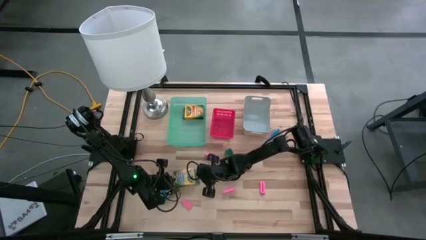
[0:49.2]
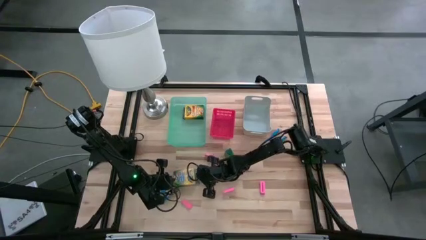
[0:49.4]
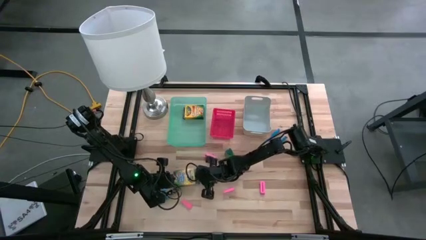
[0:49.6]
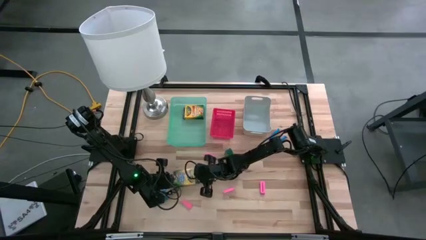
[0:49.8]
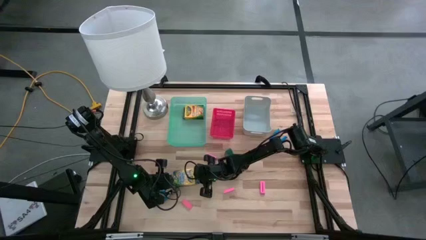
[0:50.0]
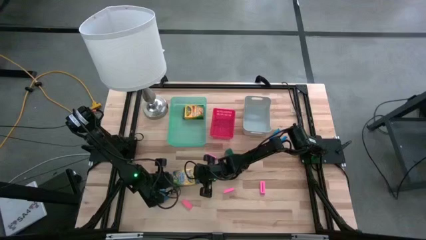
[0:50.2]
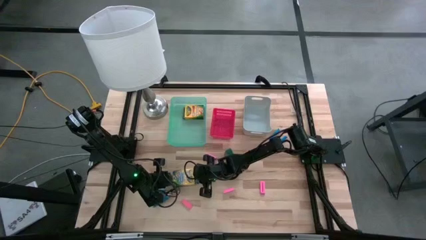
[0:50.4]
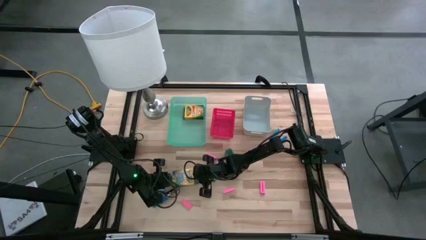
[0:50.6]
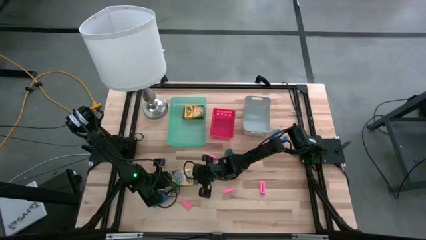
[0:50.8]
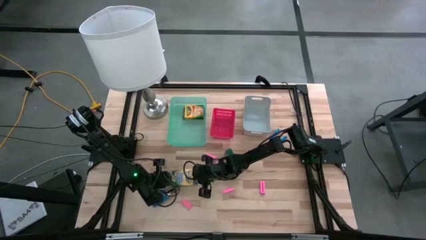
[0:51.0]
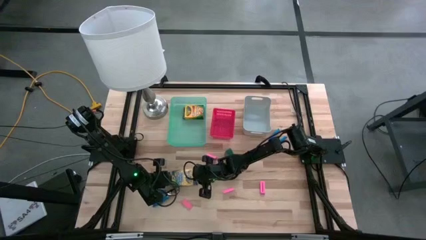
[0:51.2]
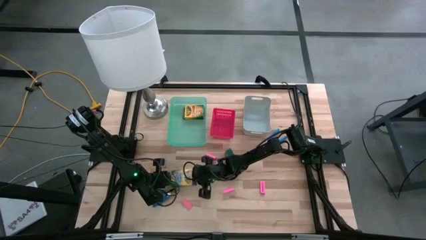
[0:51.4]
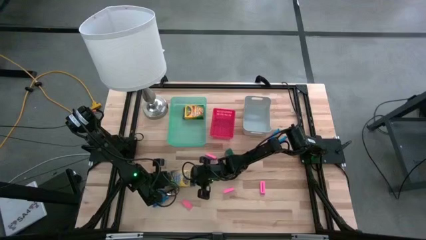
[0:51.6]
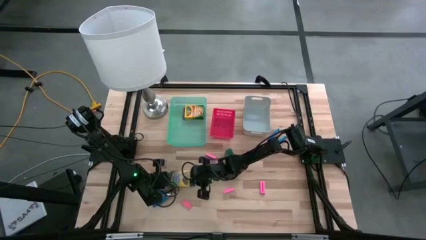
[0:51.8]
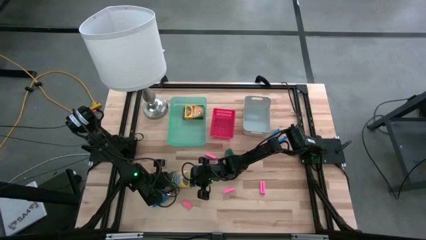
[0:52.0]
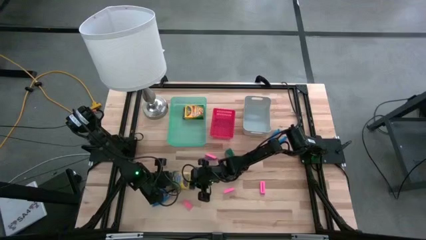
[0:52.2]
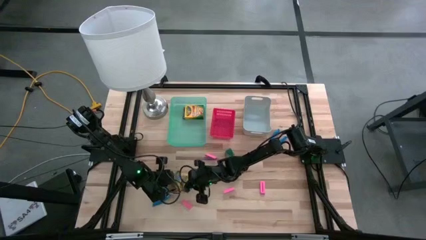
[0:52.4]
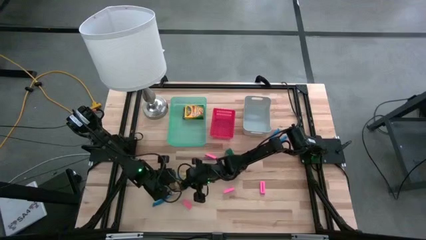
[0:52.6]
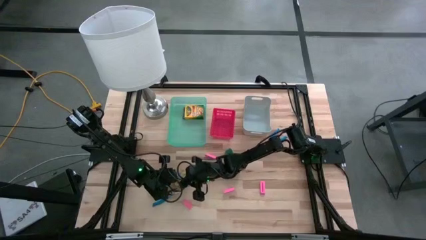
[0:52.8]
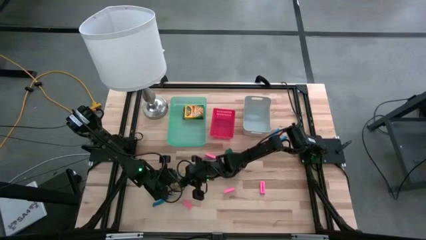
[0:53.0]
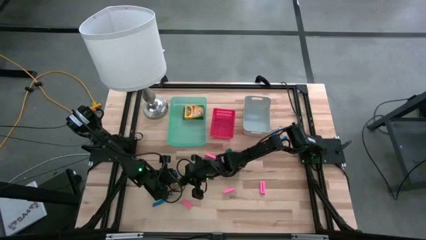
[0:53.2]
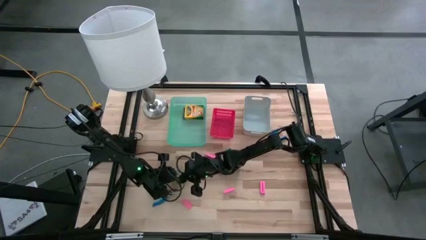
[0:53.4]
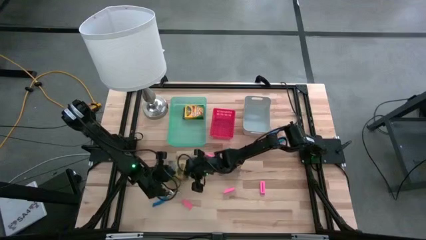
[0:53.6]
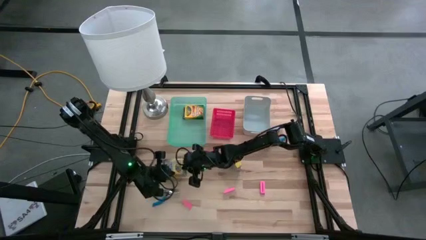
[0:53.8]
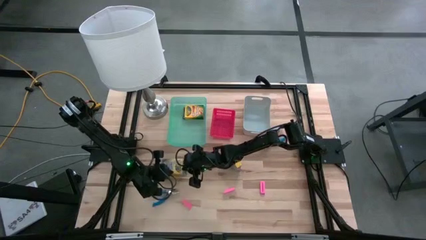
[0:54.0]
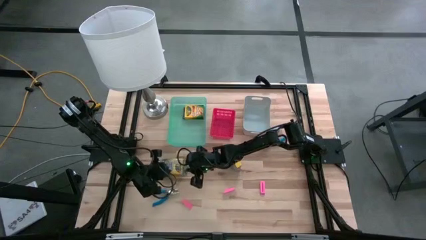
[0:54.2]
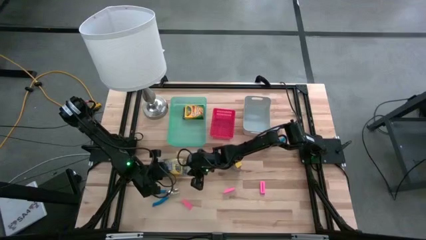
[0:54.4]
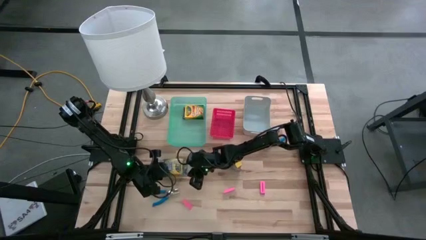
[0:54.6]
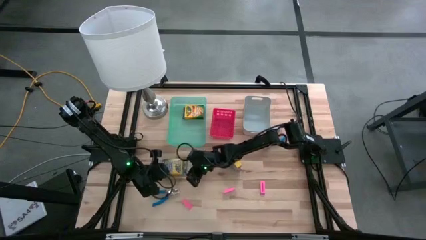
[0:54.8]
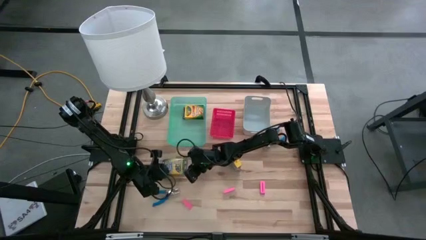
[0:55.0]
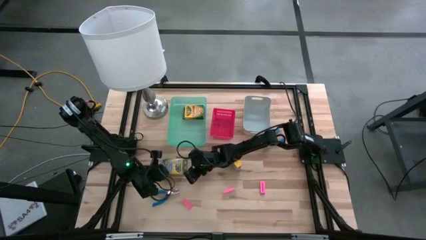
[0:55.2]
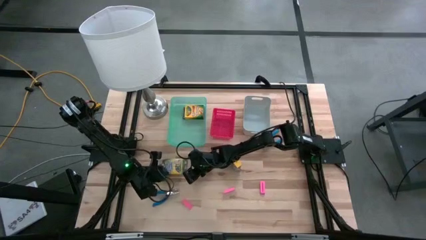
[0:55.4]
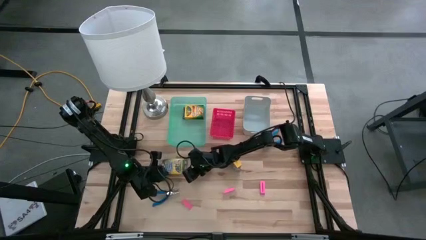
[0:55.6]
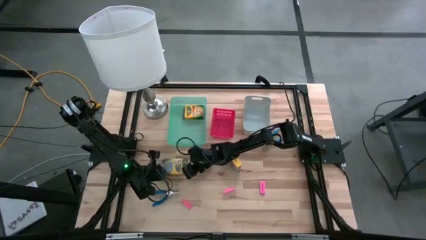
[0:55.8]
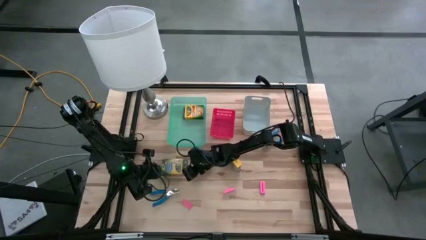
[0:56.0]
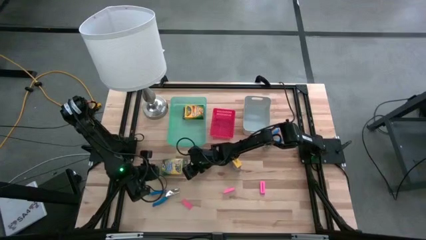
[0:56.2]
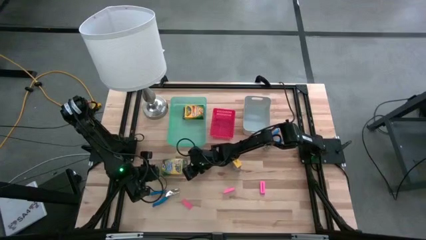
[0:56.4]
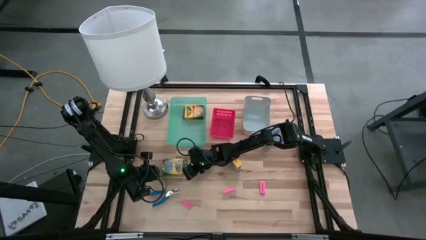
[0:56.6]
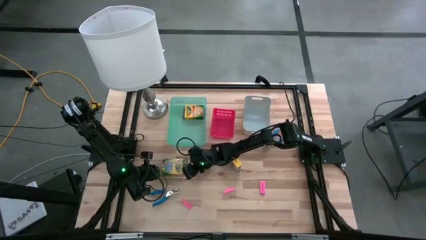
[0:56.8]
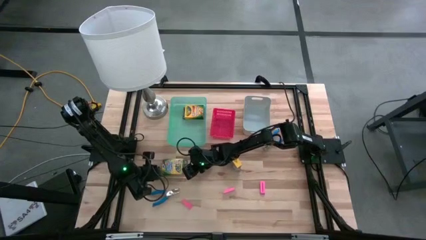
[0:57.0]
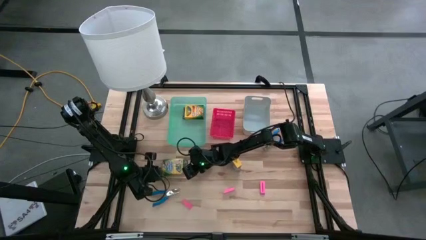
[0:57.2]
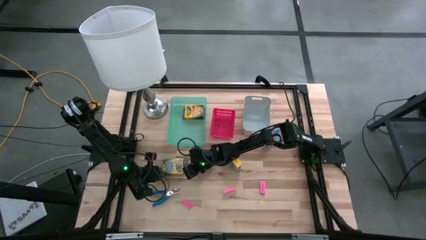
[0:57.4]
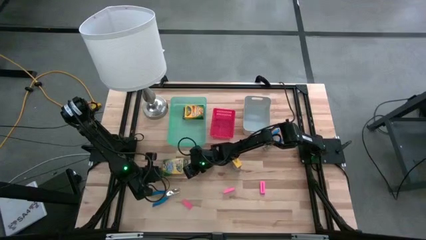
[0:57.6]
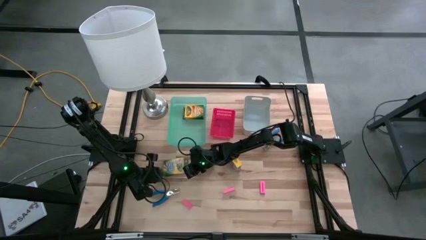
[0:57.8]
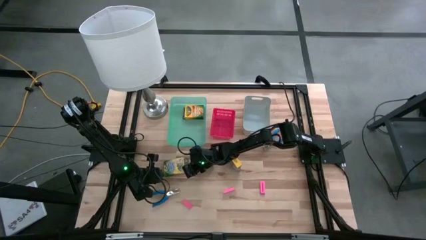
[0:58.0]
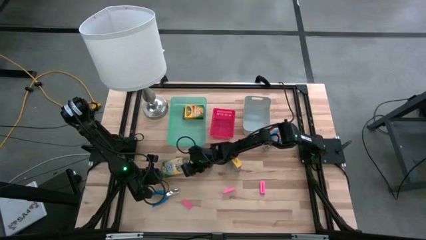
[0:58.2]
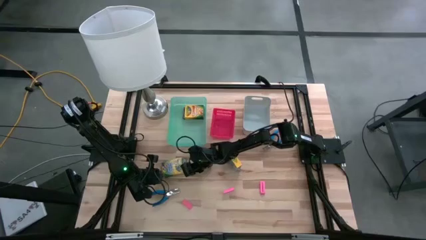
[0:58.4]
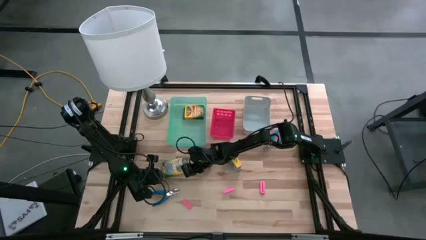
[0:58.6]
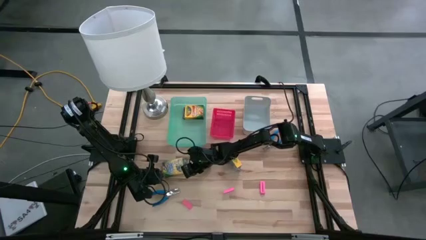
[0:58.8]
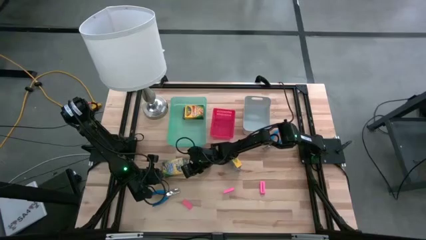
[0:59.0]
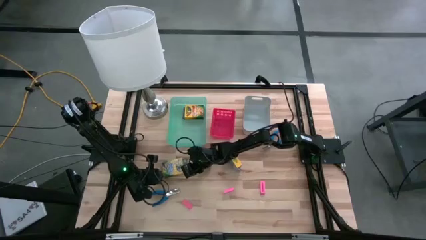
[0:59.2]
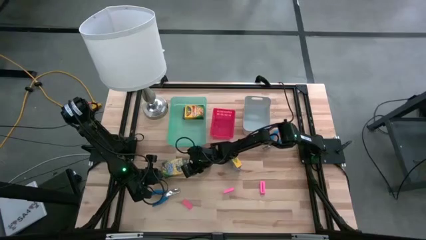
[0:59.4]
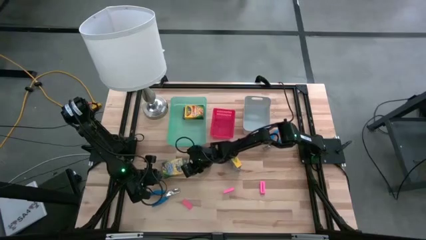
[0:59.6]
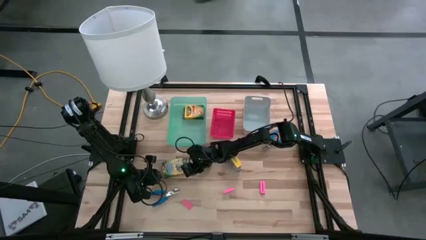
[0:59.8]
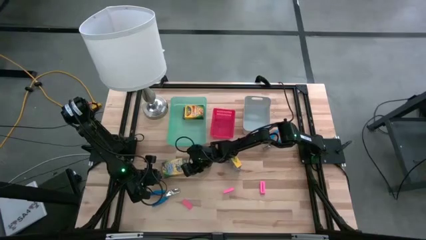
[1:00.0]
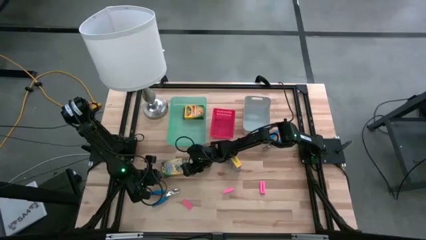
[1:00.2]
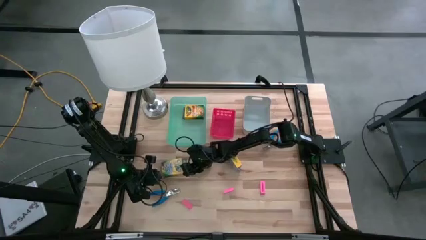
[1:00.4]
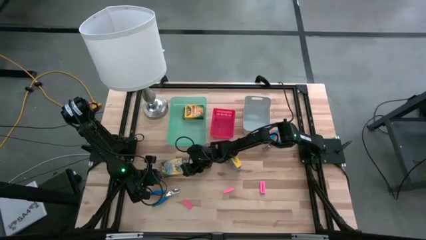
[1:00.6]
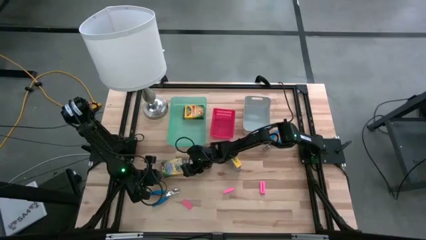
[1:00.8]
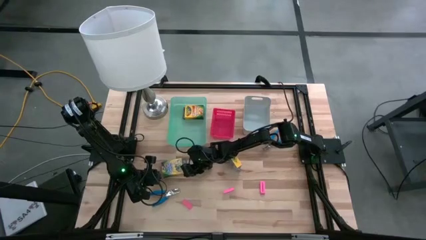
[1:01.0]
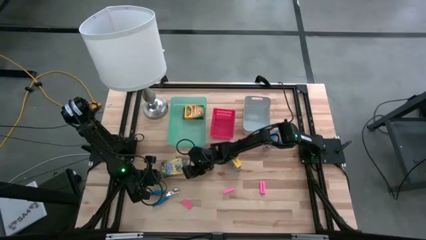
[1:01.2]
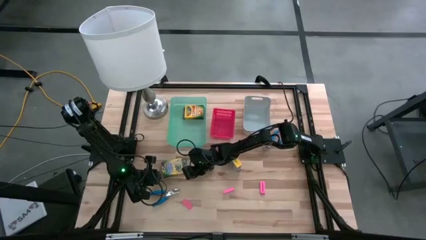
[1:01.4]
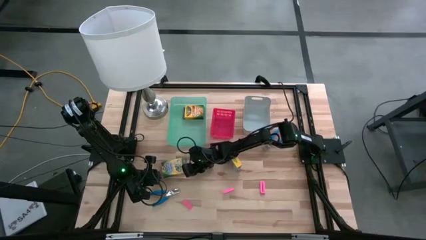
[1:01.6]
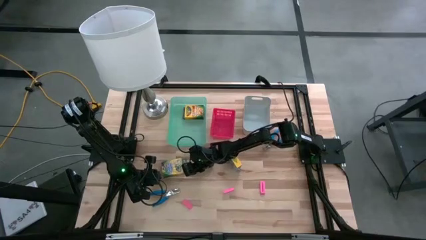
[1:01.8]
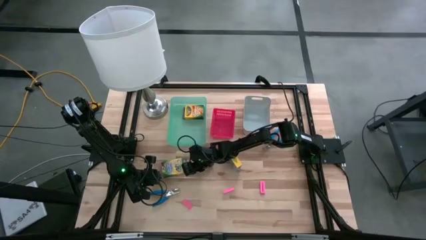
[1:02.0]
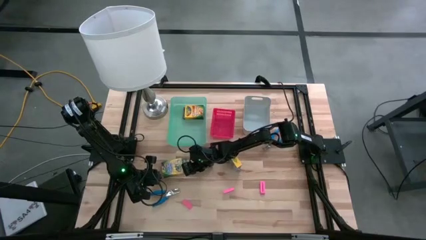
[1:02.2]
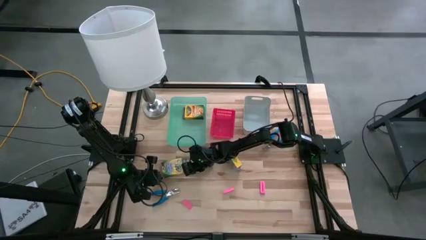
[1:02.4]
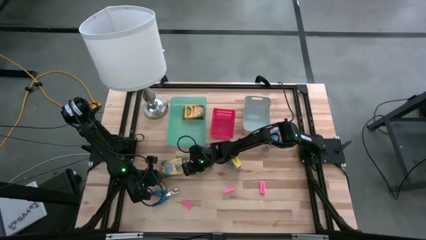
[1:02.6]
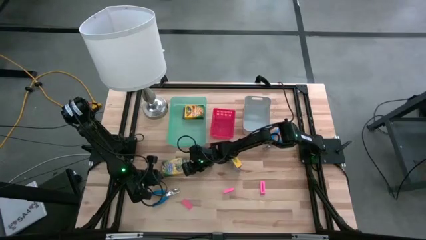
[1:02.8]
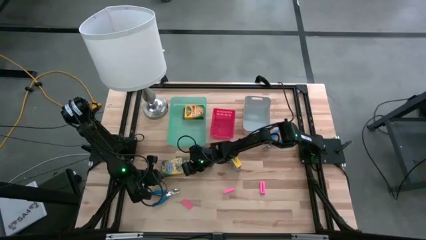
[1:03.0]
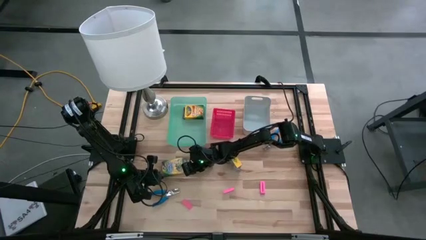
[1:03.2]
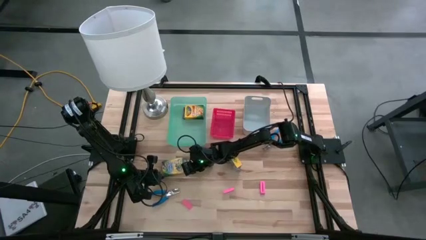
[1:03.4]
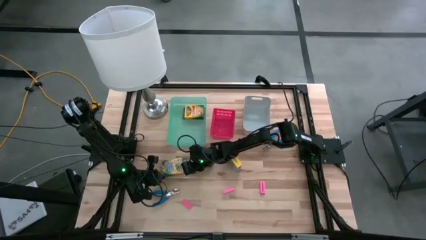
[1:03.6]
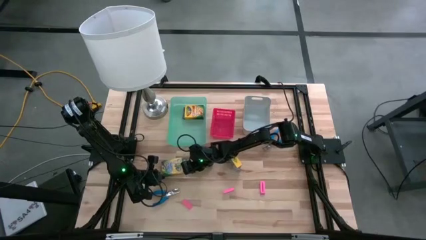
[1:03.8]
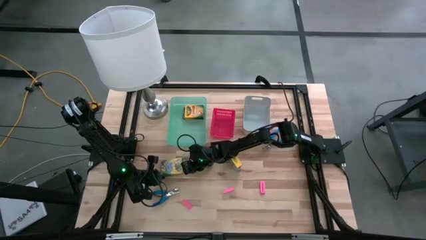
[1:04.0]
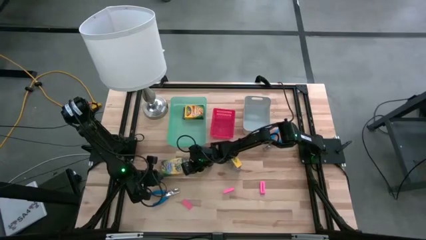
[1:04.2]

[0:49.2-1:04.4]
Task: Pick & Place School Supplies
Put the yellow crayon box into the green bin
